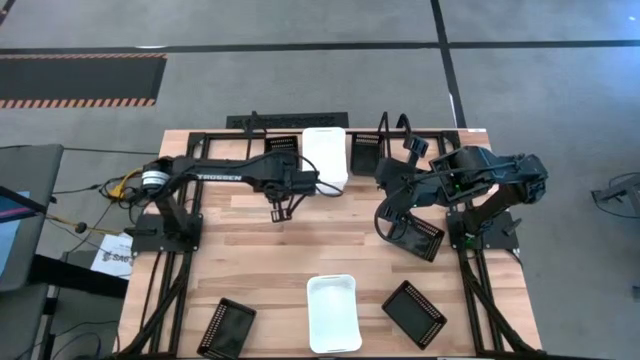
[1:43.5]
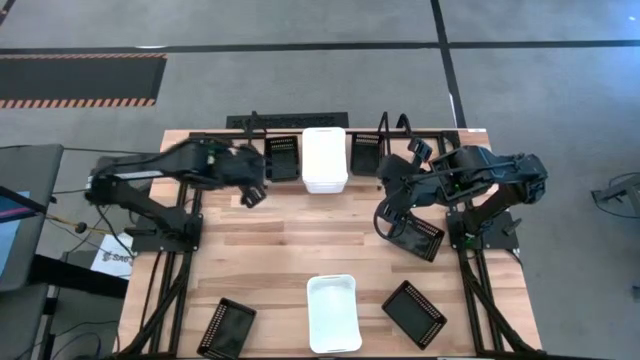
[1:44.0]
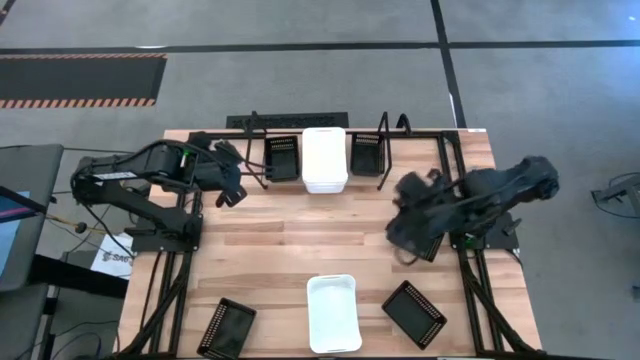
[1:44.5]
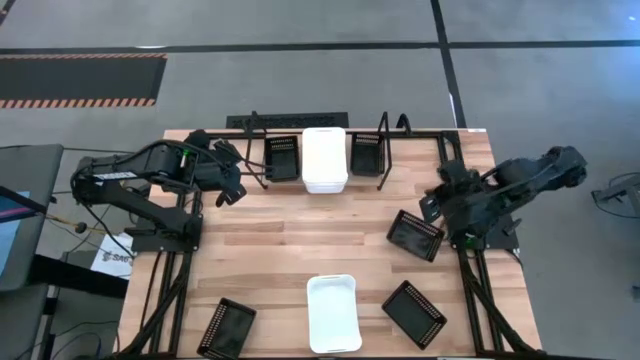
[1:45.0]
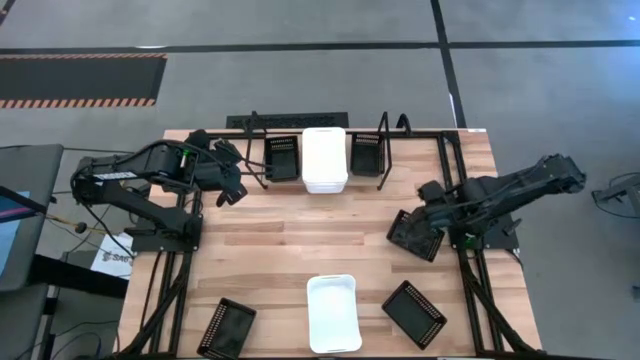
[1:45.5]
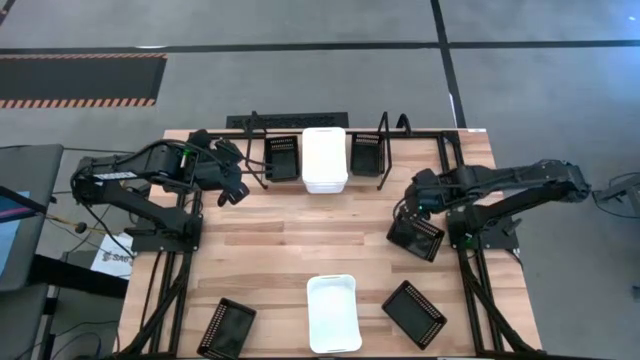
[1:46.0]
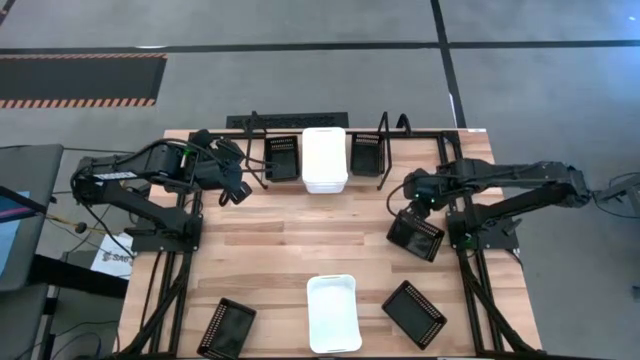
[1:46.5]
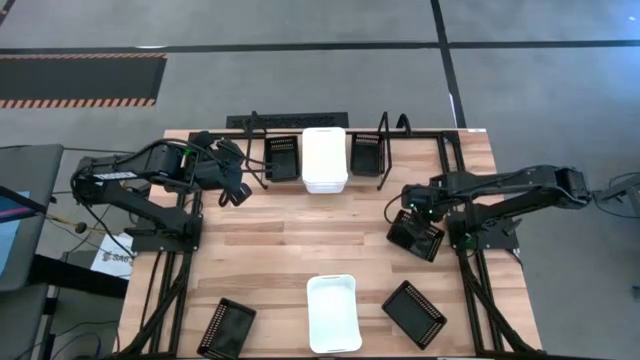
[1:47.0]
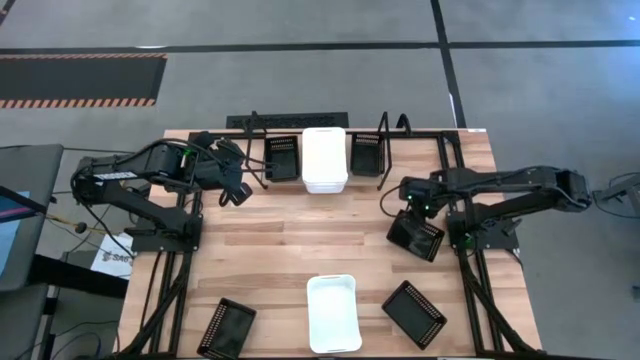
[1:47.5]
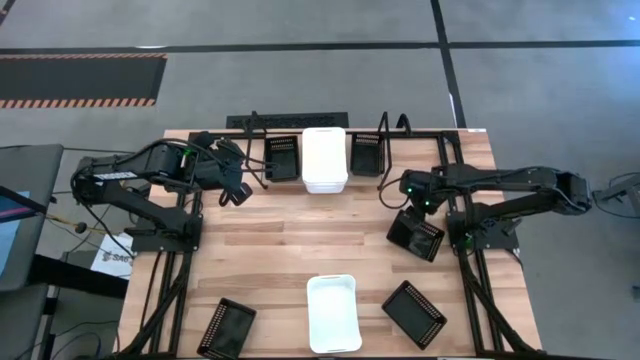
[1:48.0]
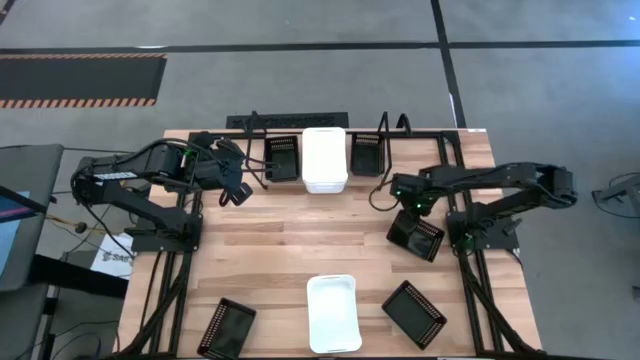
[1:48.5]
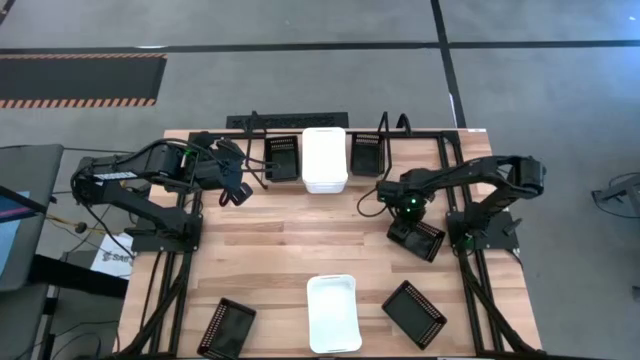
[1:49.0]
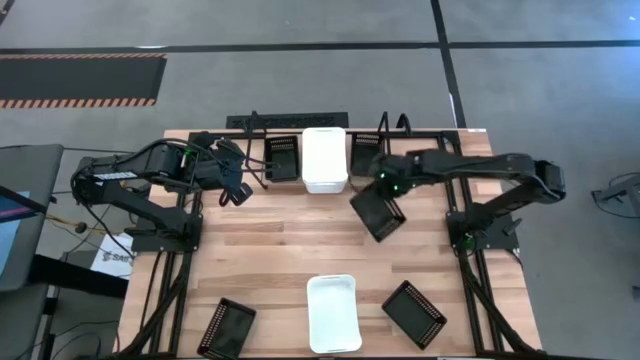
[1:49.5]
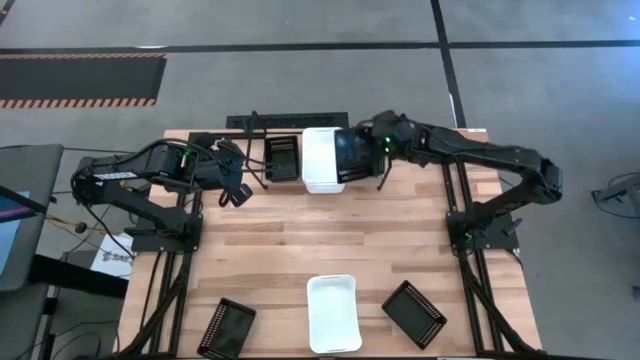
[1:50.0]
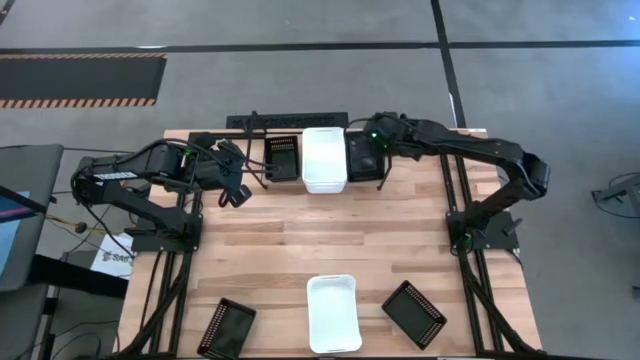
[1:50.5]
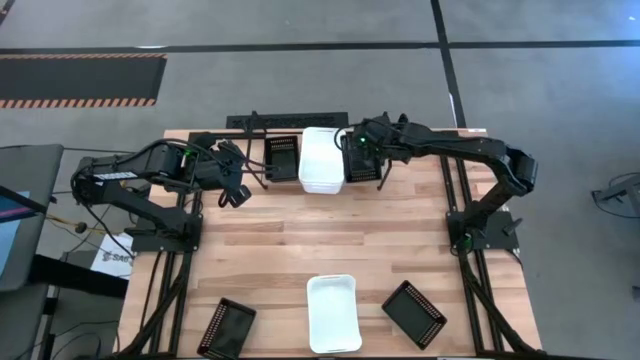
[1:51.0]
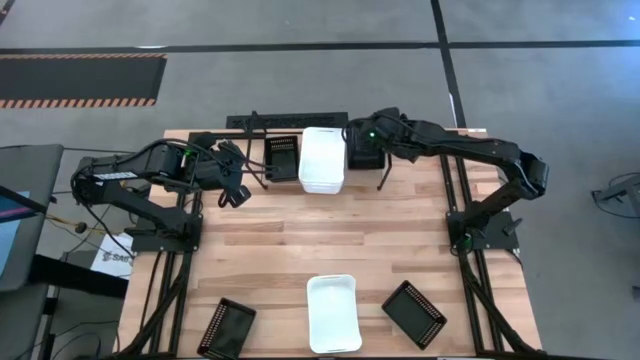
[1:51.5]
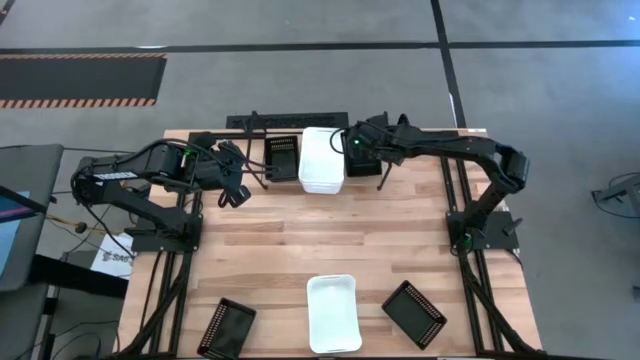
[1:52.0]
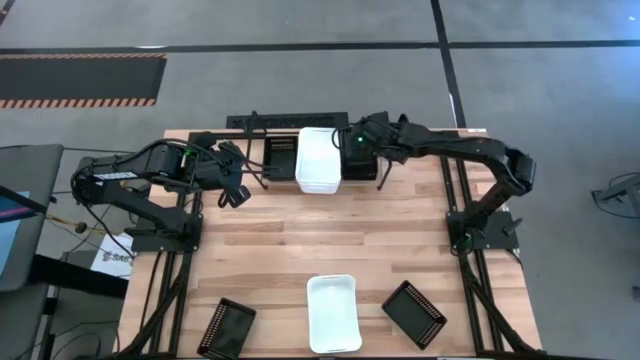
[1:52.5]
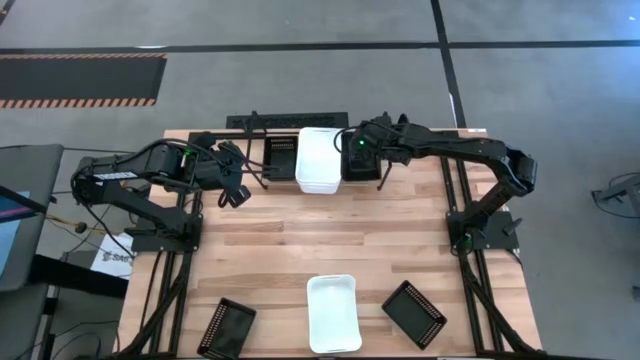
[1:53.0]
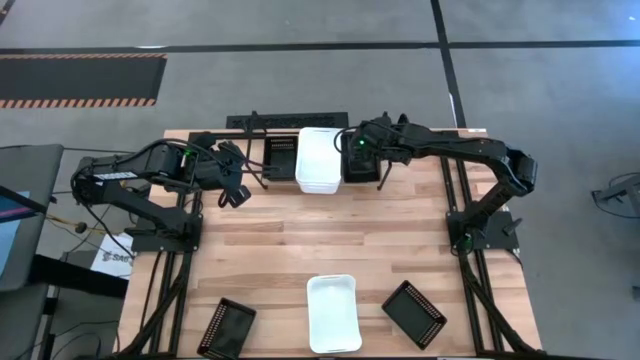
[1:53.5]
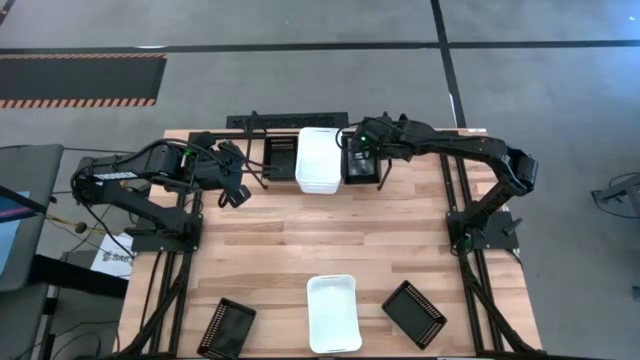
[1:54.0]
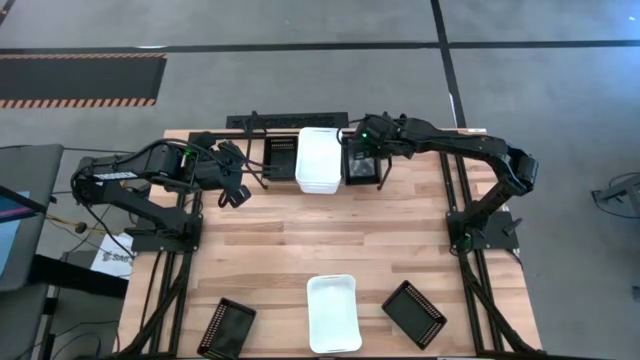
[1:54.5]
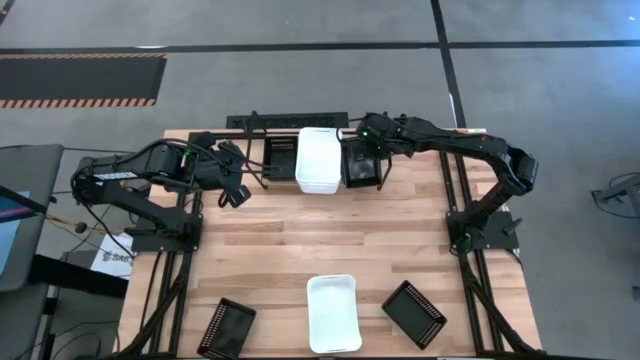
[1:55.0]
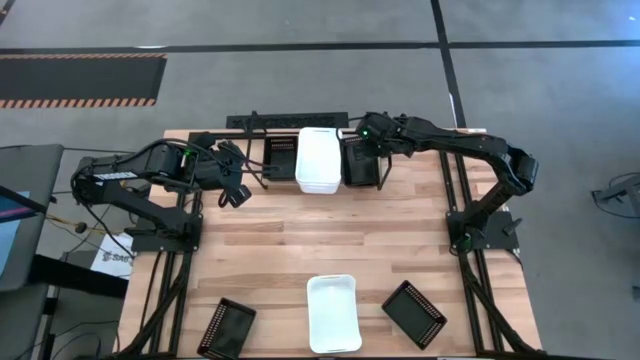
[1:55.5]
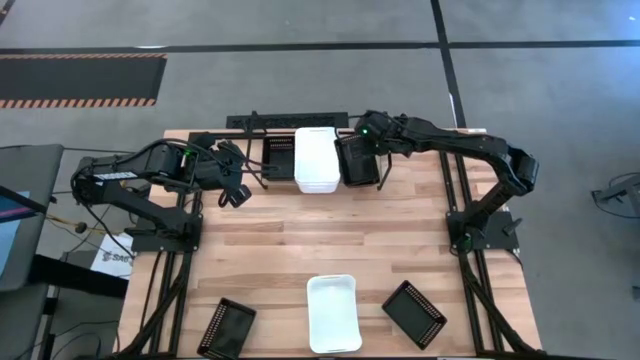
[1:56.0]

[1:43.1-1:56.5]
Task: Stack baskets on shelf by color
Stack the black bin on top of the right black bin on the shelf

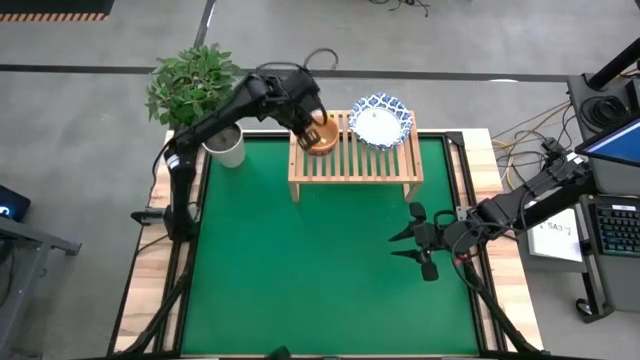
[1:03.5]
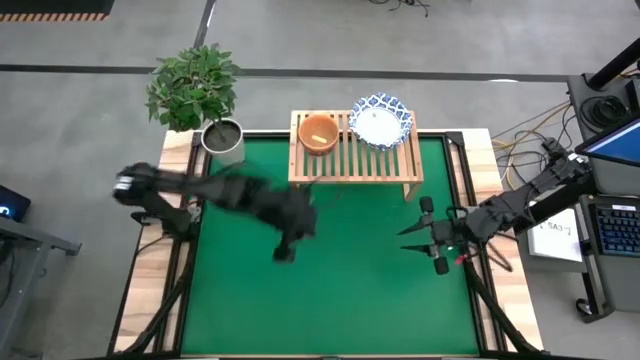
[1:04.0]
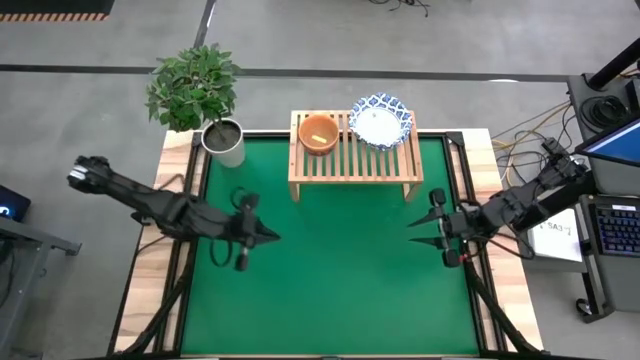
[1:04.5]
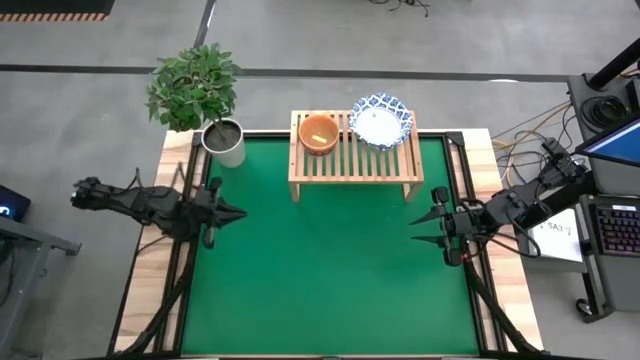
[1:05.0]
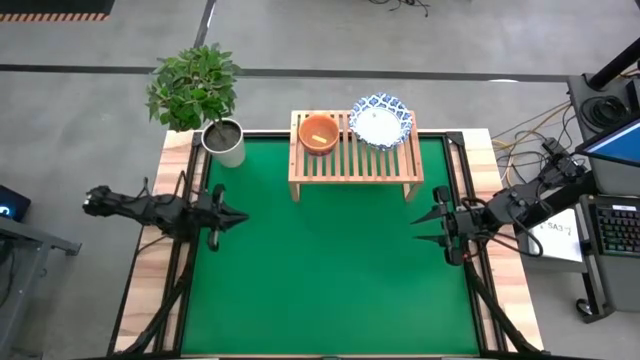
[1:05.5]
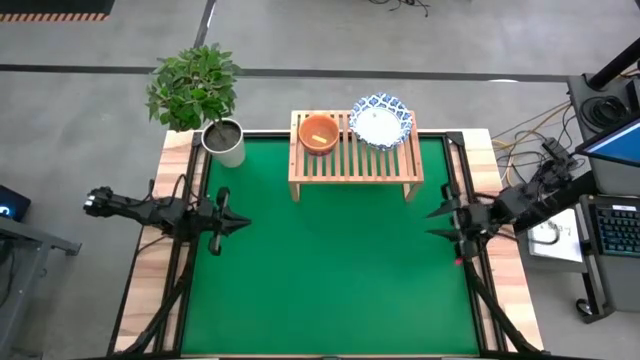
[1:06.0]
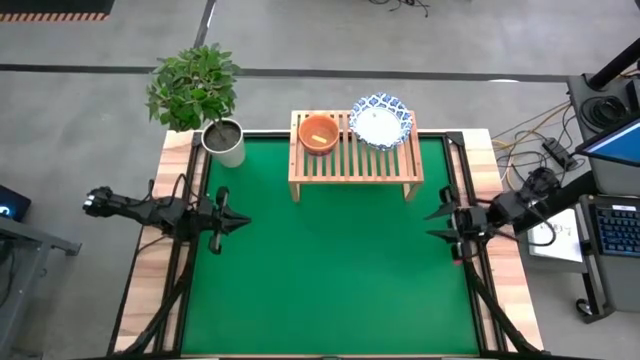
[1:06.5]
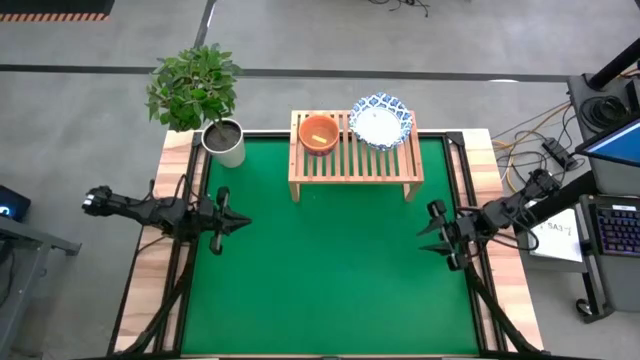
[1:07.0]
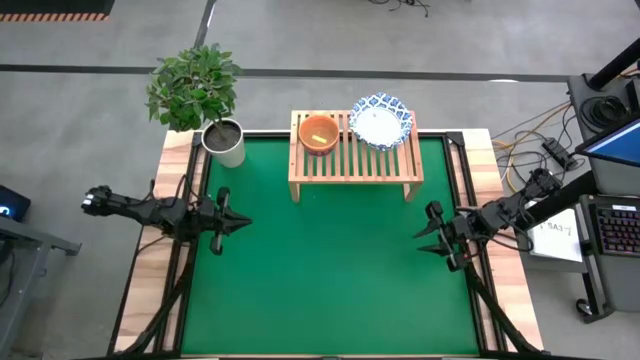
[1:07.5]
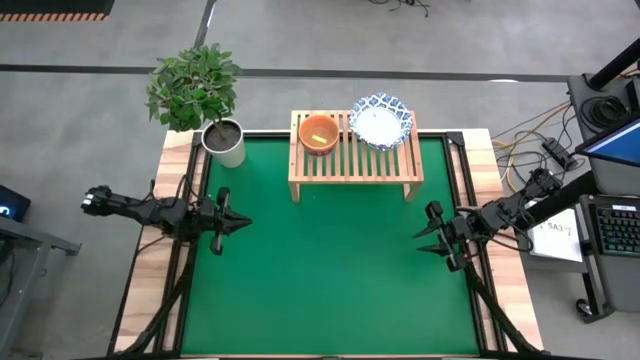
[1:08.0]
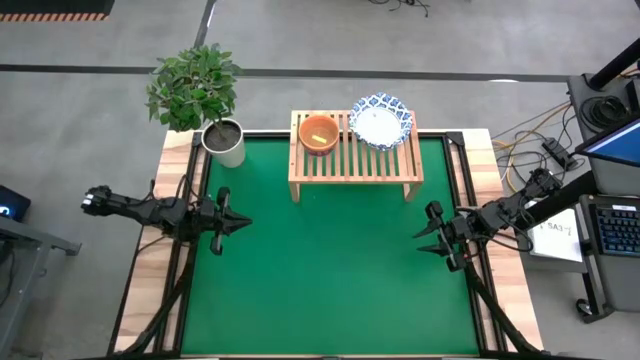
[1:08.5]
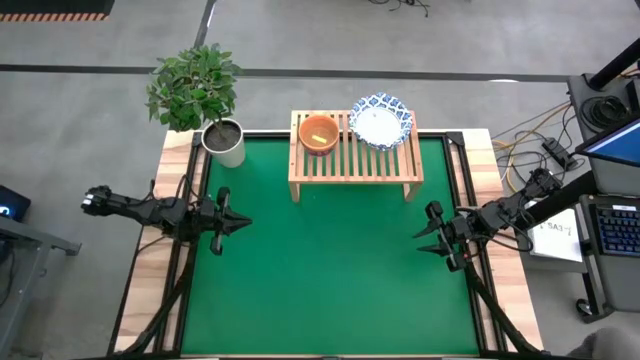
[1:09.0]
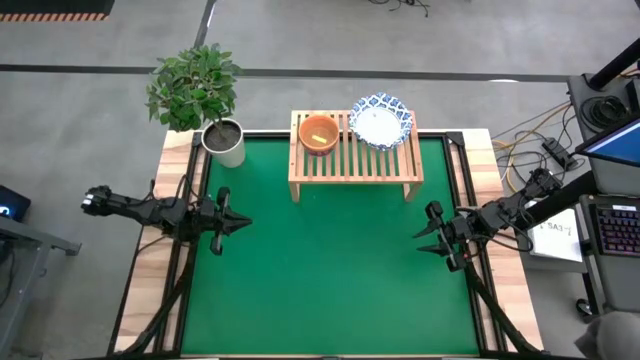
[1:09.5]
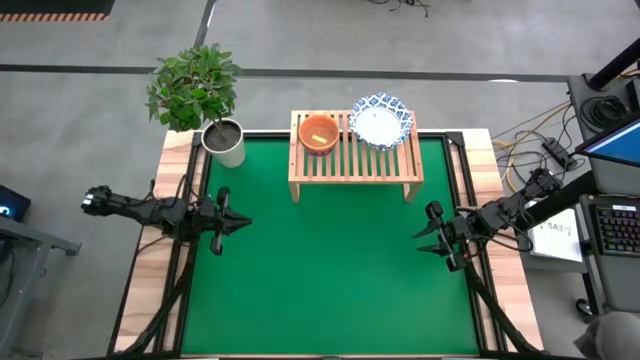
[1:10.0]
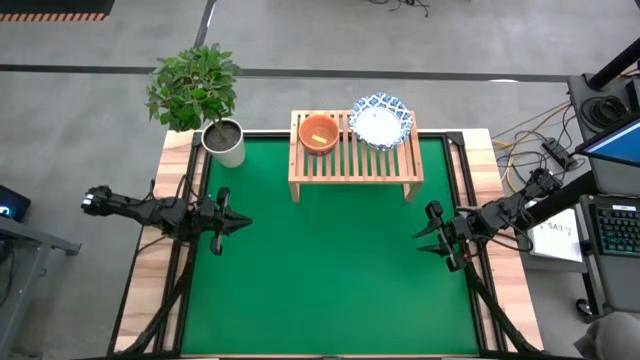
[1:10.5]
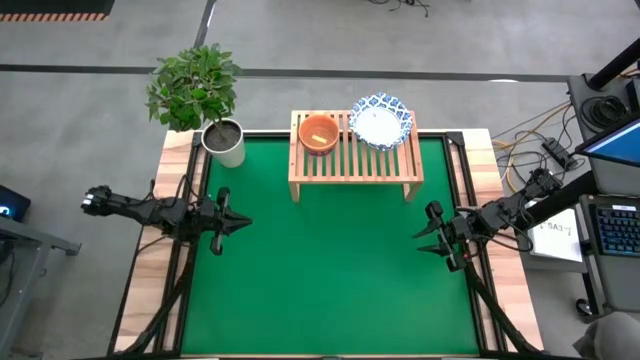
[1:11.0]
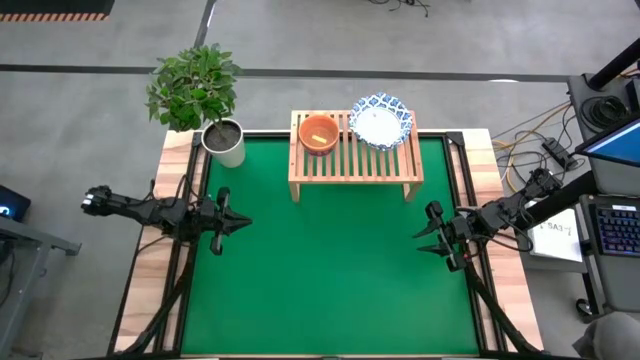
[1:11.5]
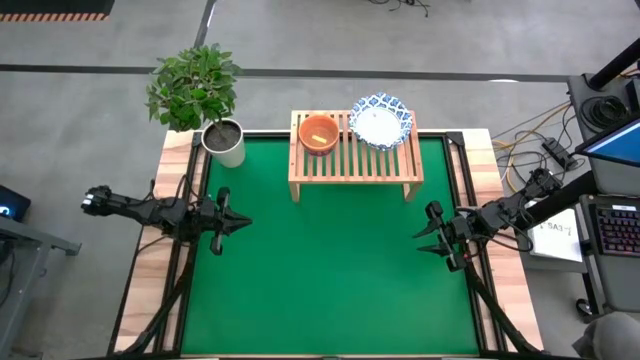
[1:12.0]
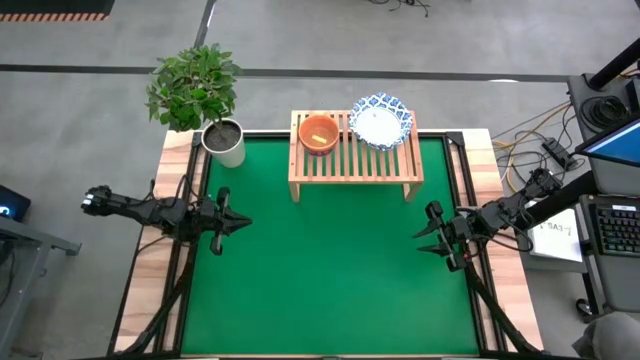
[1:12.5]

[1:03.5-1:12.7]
Task: Place and stack bowls onto a shelf
Return to Home Position
